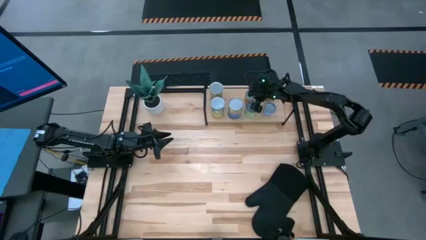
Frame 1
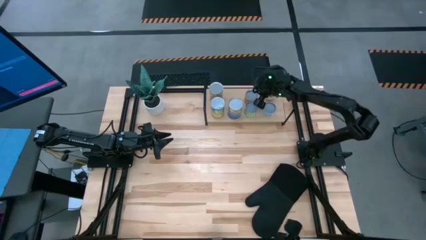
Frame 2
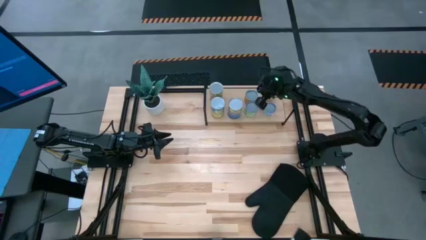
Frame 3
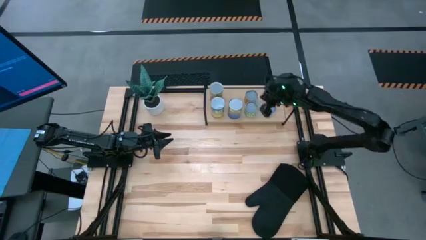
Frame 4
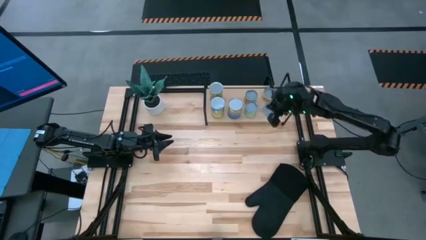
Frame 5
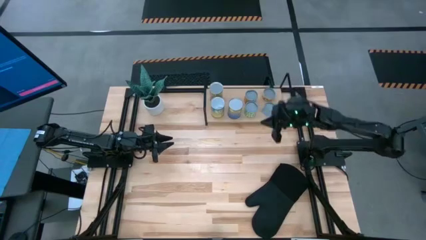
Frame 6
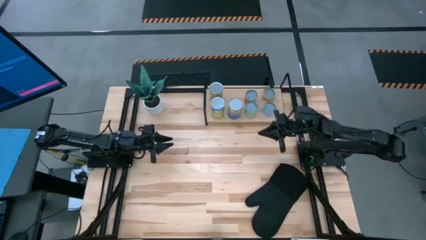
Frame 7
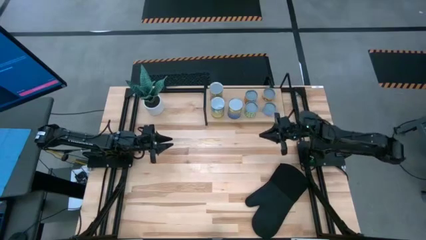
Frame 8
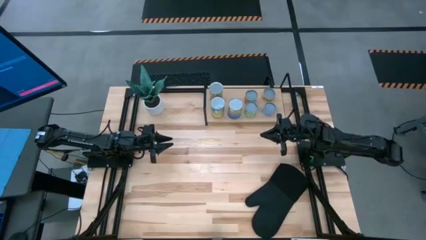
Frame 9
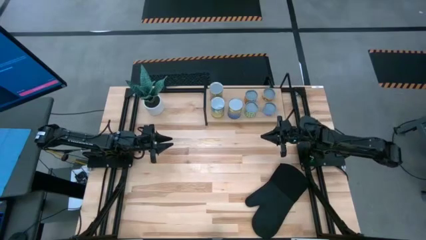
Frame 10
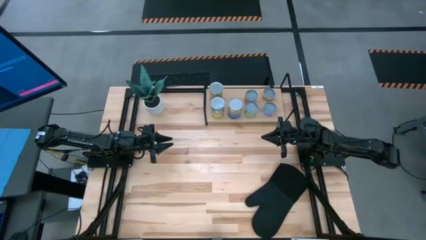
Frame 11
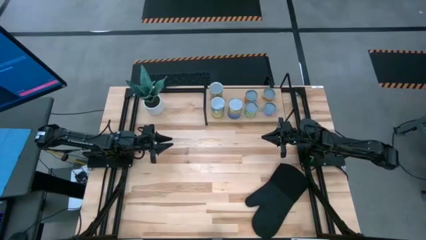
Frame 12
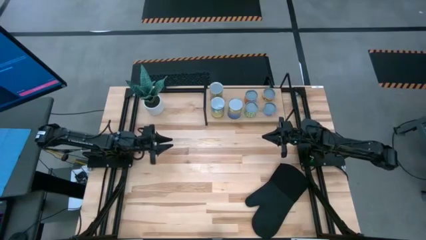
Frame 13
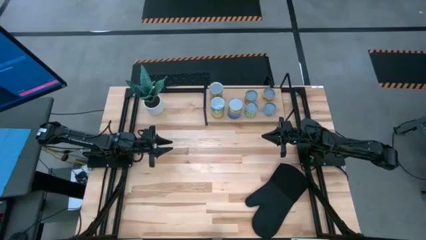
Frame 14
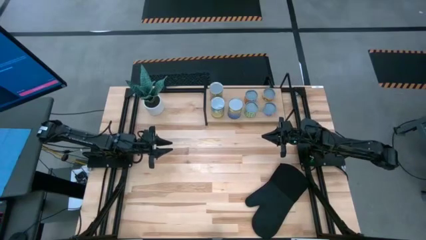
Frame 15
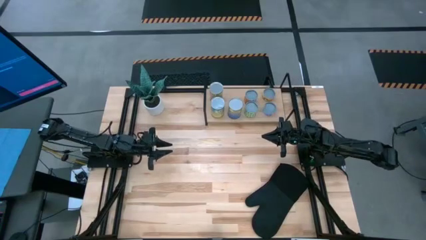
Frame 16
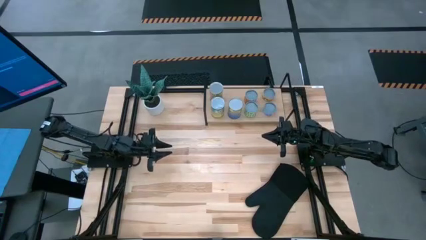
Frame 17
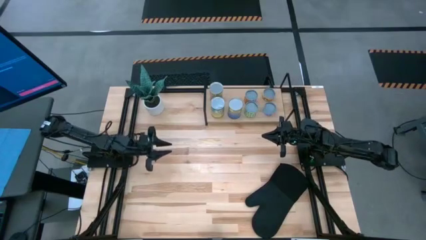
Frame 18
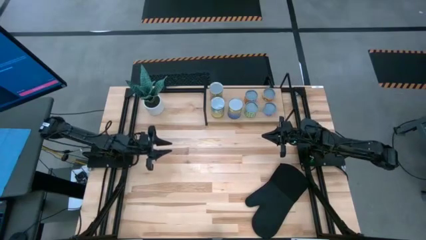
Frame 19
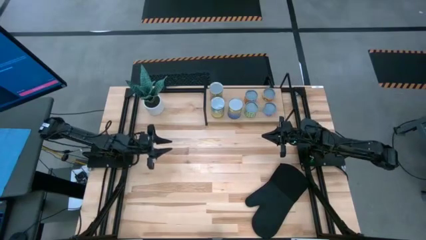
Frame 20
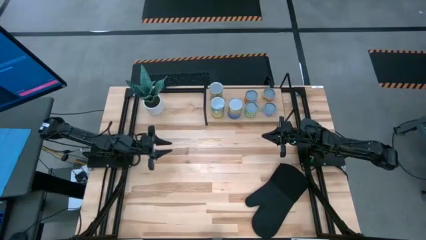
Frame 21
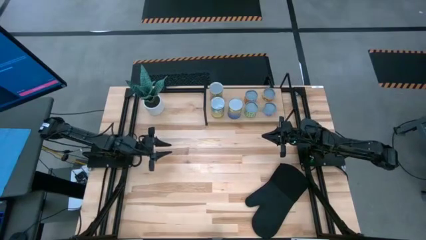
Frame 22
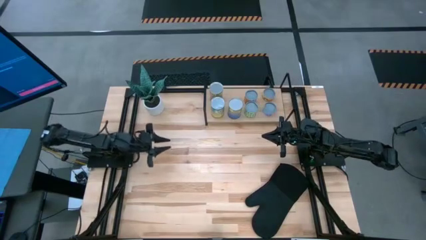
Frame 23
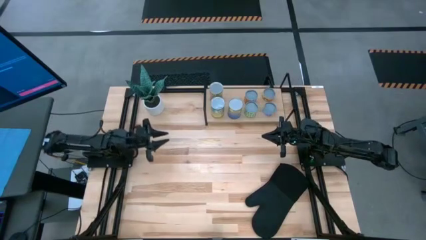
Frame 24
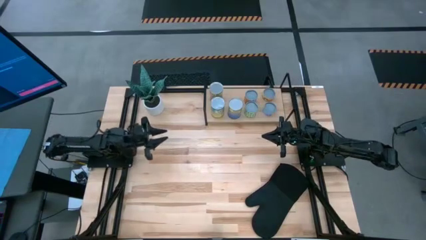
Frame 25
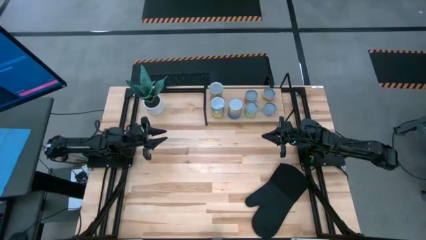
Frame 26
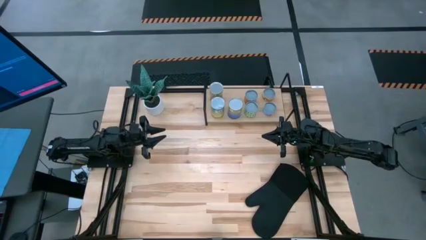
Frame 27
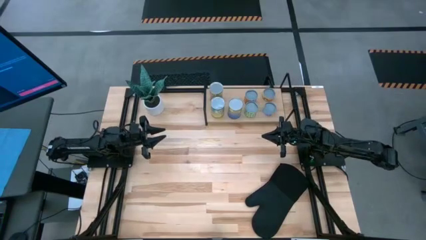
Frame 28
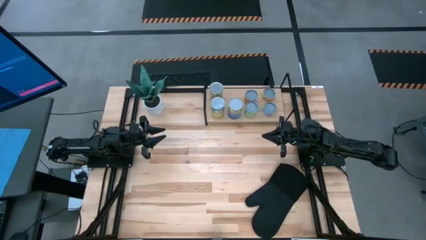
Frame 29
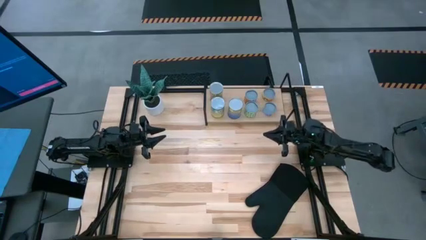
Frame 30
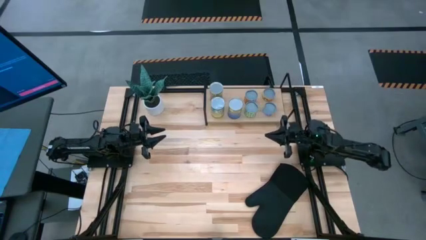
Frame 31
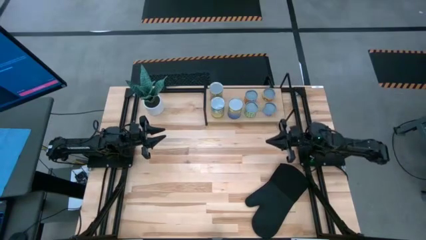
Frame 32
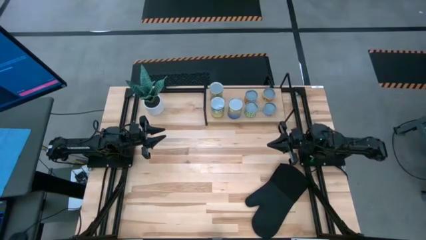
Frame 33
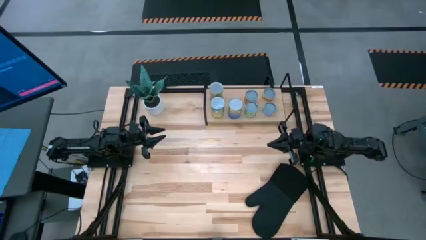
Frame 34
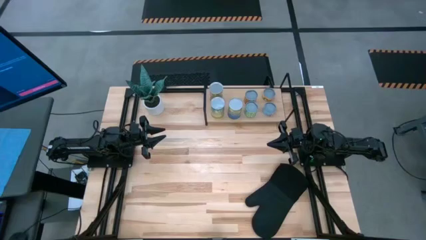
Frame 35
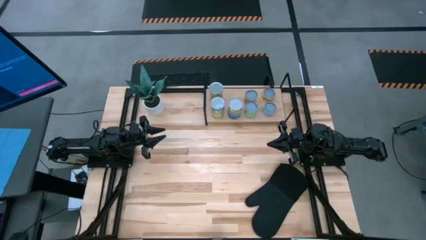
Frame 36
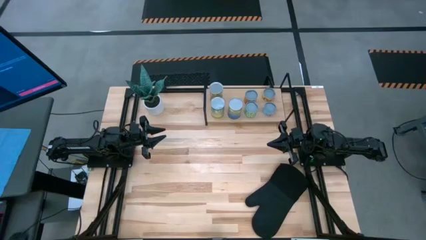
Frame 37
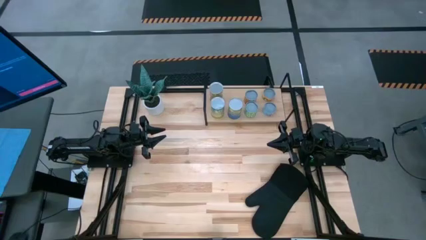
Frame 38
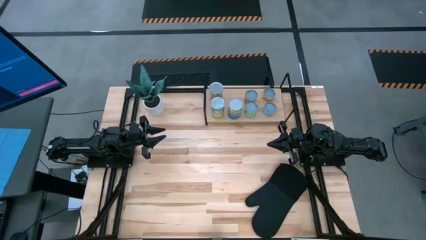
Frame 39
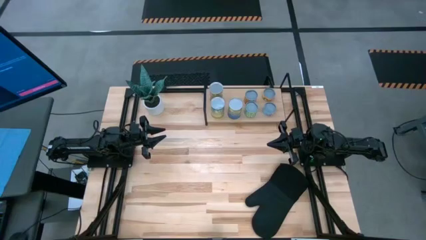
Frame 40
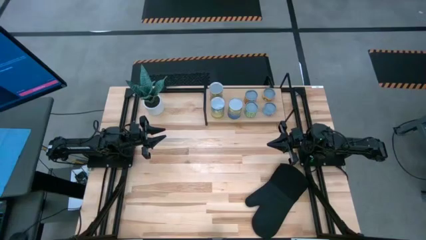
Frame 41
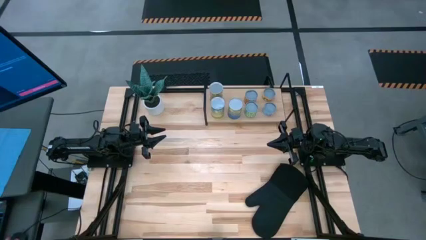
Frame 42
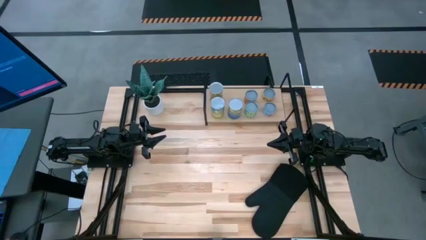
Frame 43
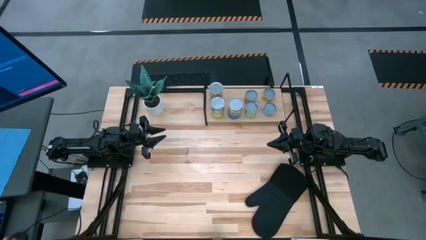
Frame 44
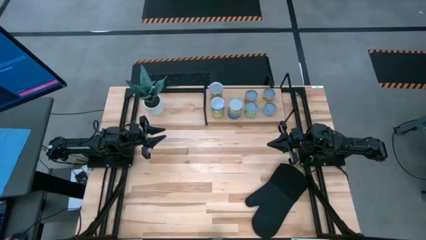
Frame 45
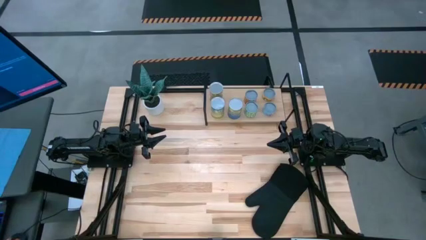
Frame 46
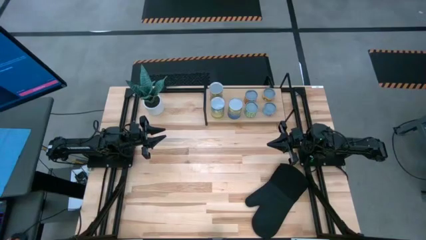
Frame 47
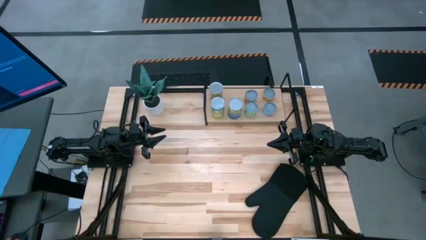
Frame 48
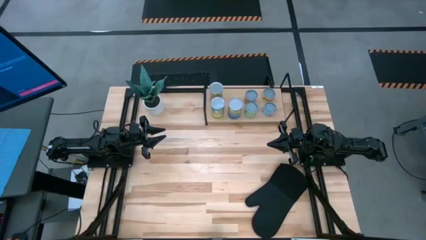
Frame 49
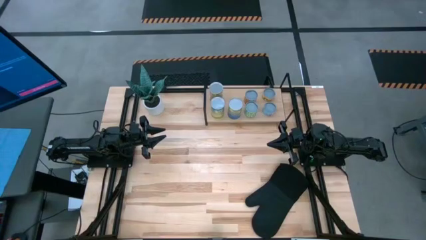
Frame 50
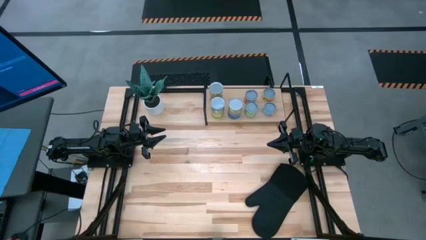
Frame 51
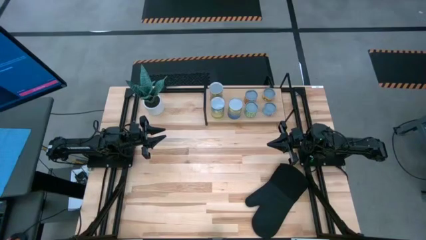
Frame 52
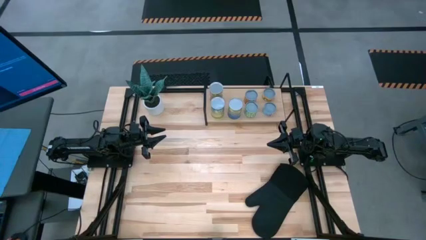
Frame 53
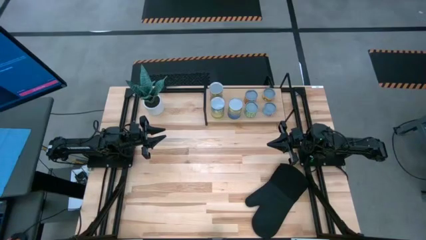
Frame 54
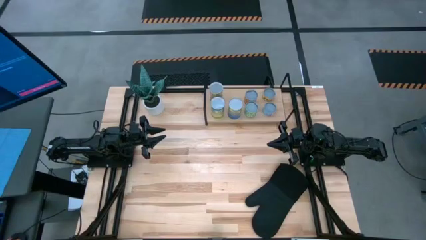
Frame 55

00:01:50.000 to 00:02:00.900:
Task: Pick and place cans onto a shelf
Return to Home Position
